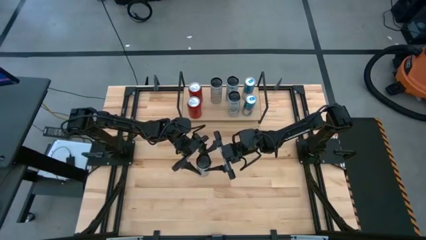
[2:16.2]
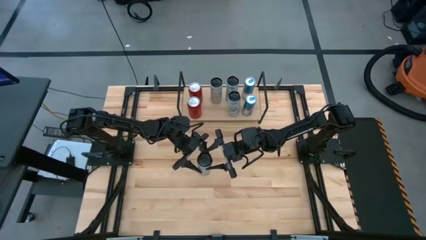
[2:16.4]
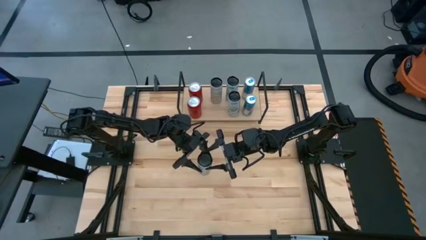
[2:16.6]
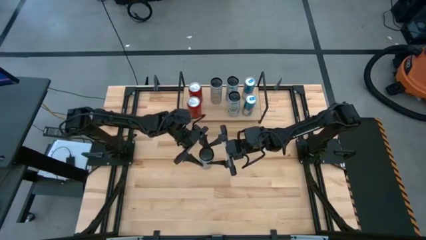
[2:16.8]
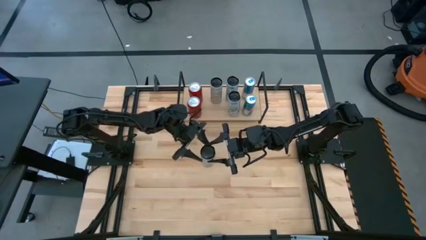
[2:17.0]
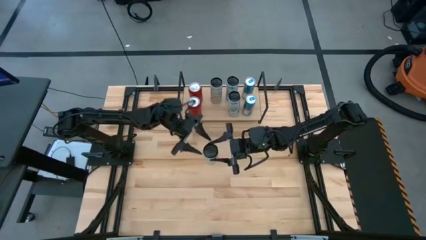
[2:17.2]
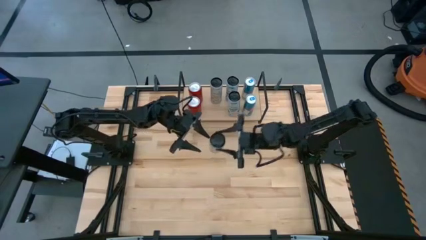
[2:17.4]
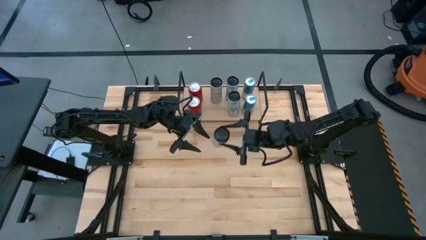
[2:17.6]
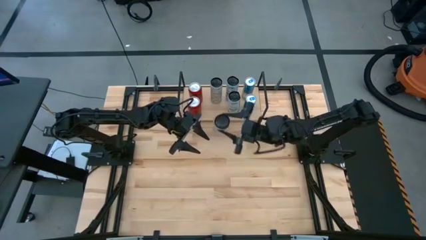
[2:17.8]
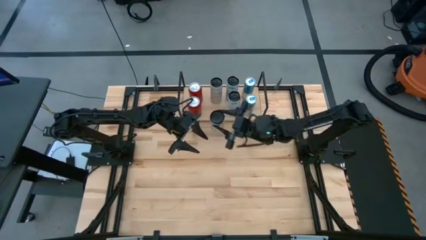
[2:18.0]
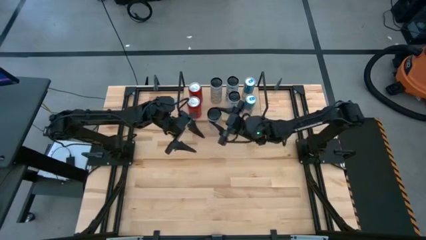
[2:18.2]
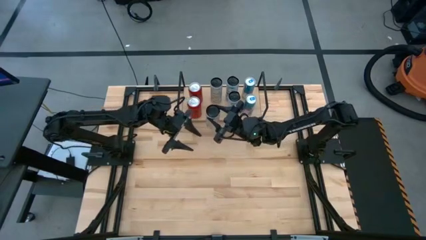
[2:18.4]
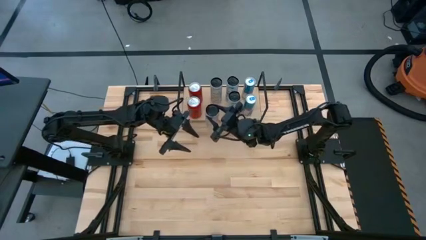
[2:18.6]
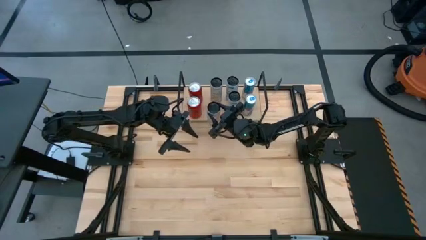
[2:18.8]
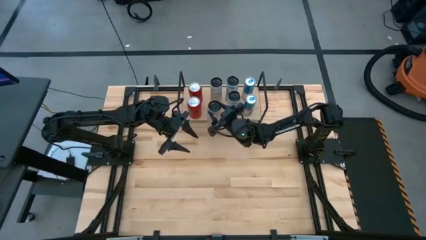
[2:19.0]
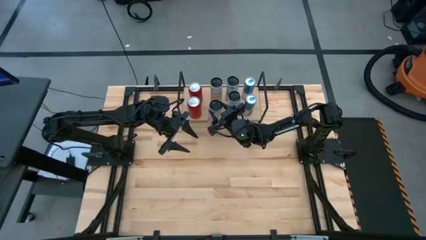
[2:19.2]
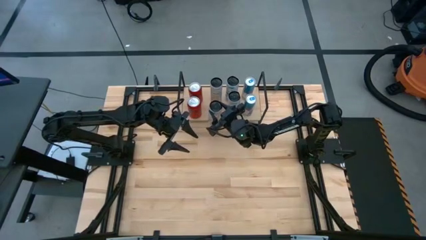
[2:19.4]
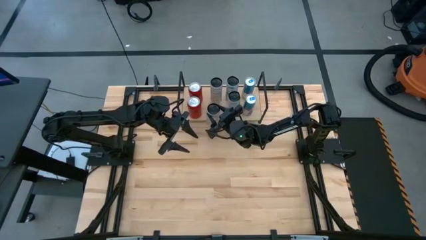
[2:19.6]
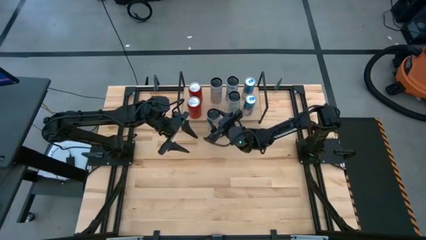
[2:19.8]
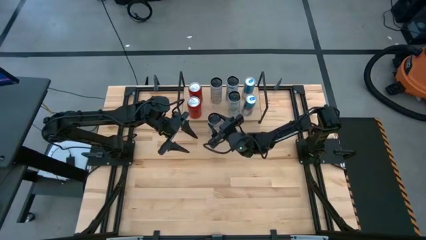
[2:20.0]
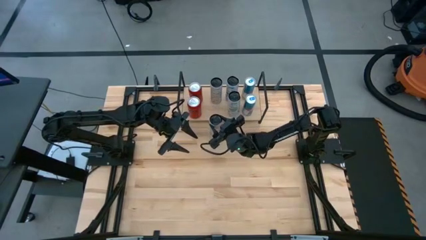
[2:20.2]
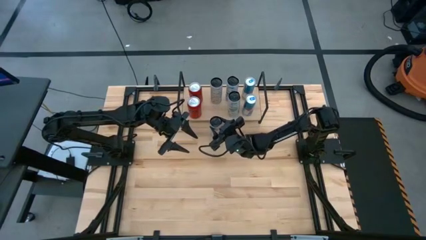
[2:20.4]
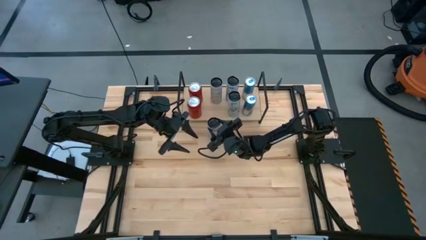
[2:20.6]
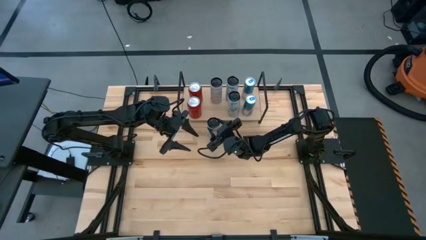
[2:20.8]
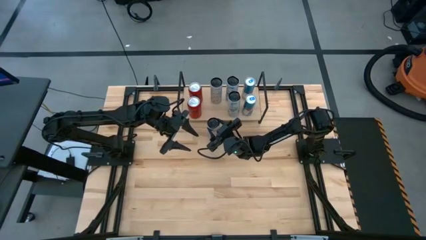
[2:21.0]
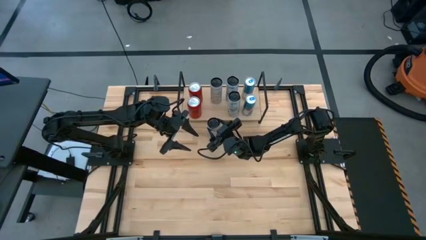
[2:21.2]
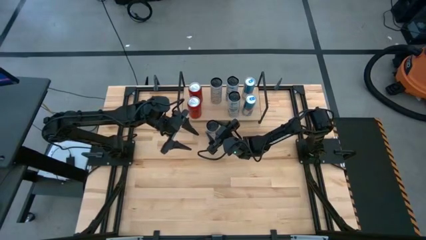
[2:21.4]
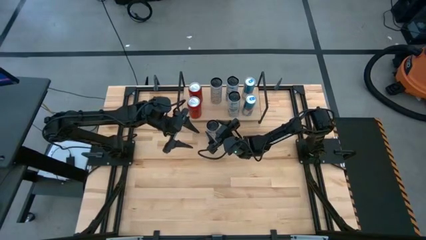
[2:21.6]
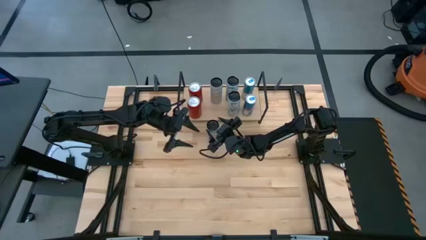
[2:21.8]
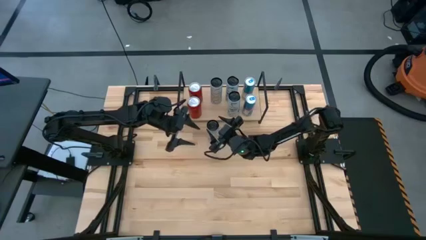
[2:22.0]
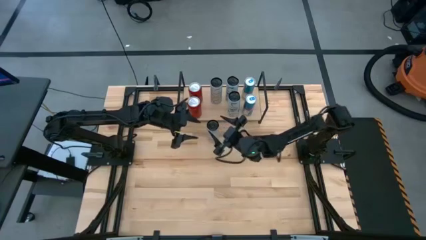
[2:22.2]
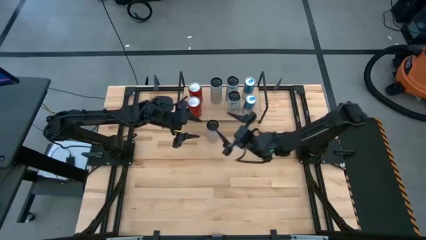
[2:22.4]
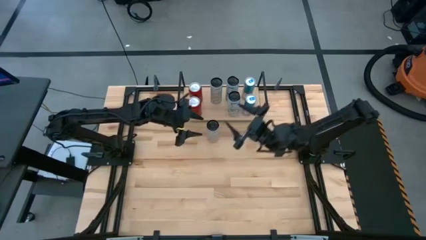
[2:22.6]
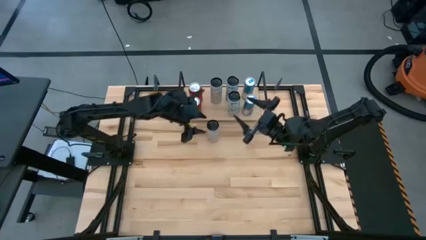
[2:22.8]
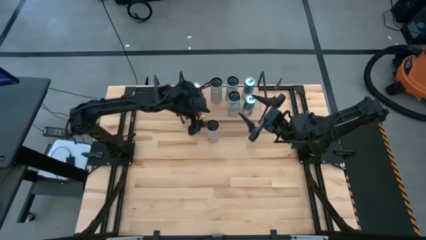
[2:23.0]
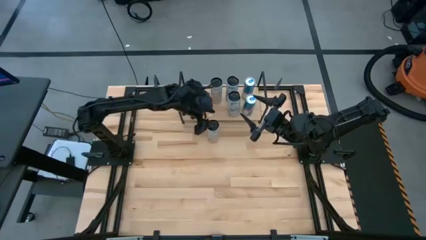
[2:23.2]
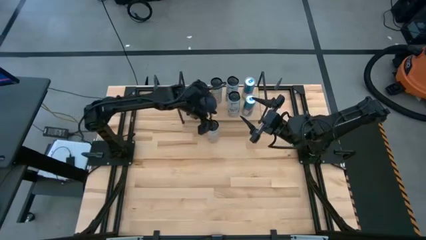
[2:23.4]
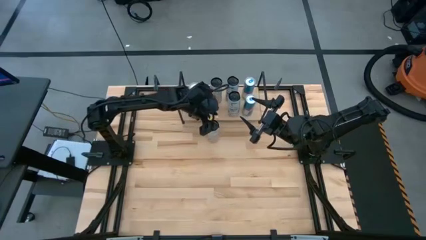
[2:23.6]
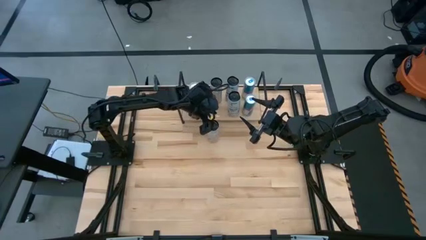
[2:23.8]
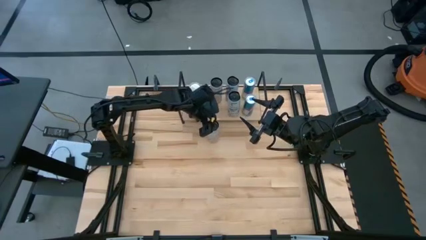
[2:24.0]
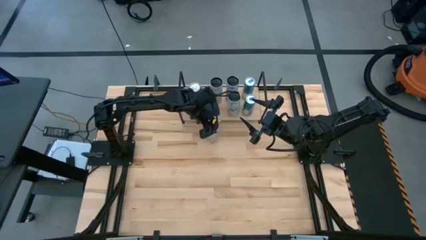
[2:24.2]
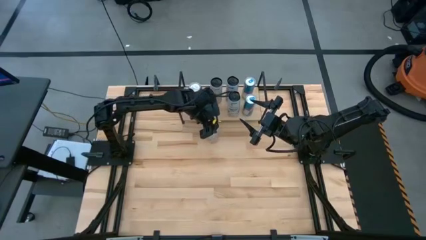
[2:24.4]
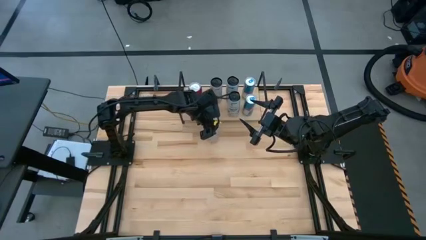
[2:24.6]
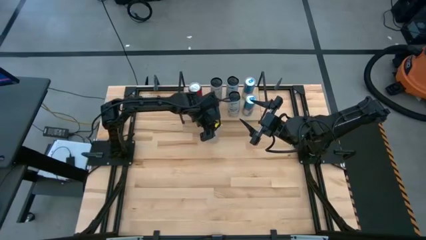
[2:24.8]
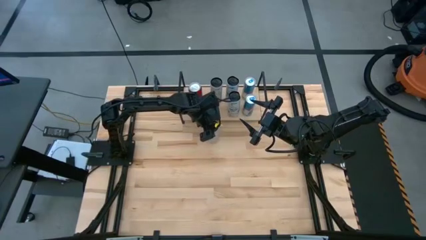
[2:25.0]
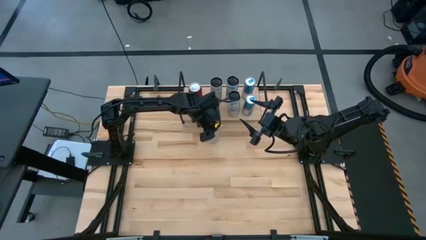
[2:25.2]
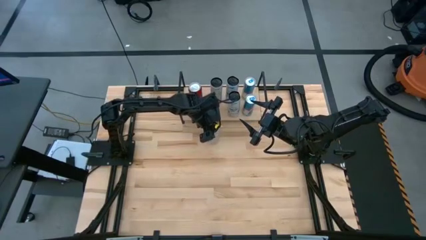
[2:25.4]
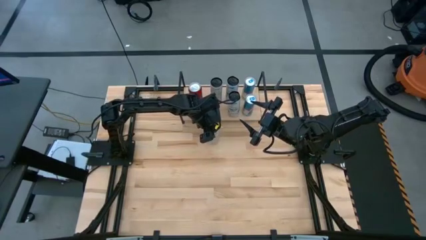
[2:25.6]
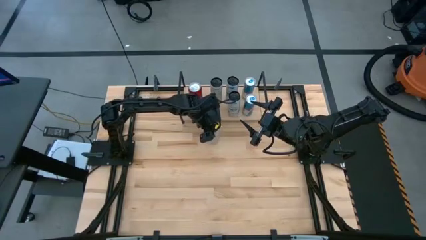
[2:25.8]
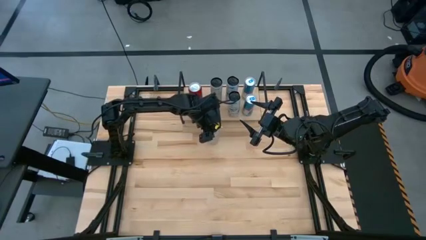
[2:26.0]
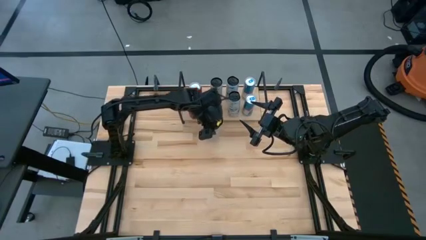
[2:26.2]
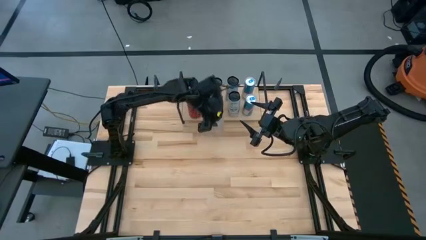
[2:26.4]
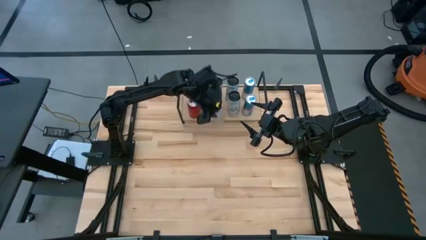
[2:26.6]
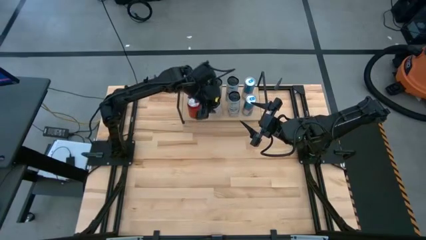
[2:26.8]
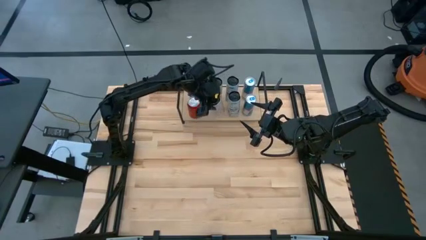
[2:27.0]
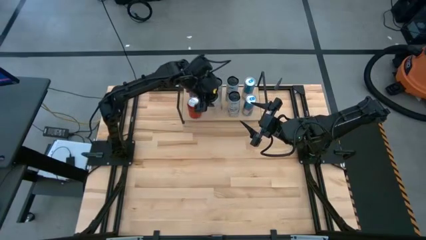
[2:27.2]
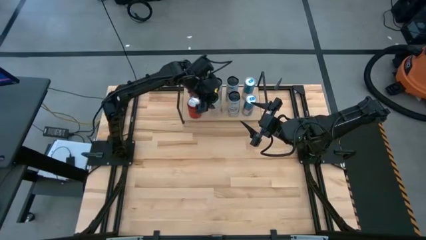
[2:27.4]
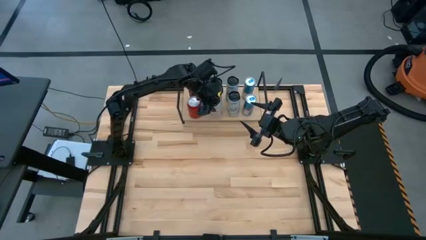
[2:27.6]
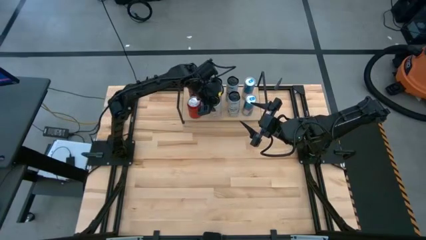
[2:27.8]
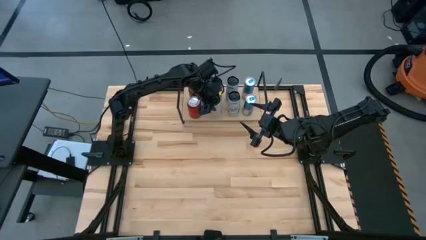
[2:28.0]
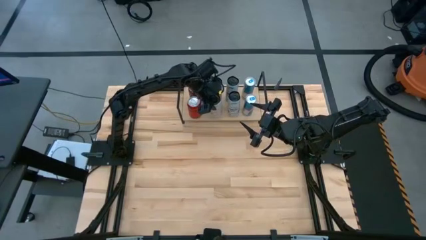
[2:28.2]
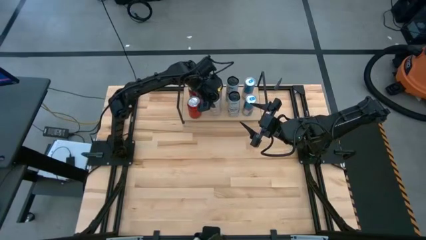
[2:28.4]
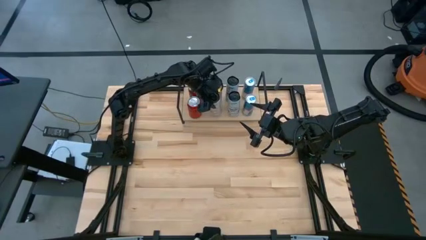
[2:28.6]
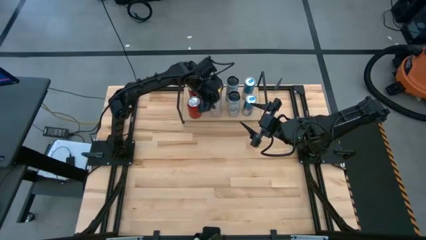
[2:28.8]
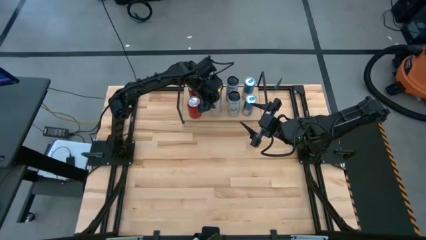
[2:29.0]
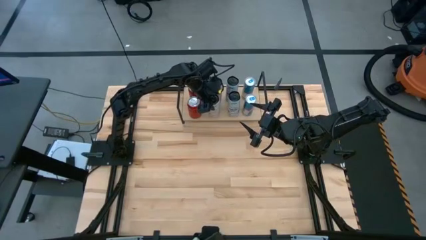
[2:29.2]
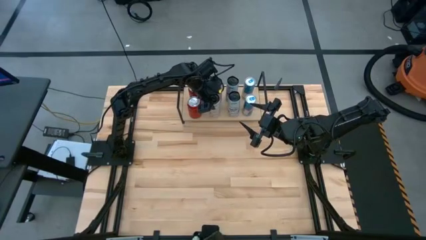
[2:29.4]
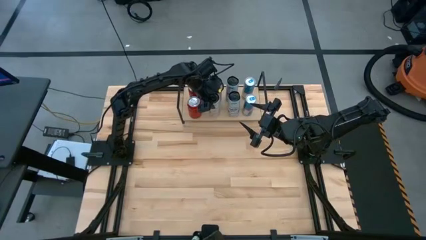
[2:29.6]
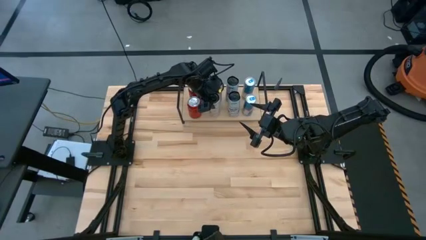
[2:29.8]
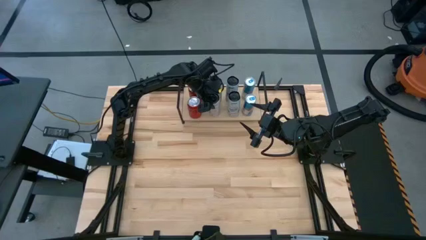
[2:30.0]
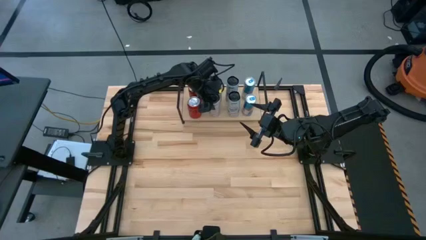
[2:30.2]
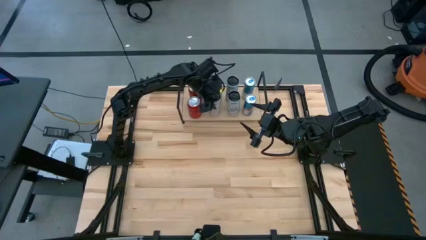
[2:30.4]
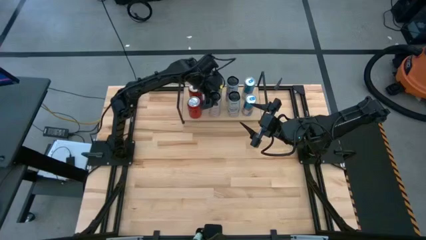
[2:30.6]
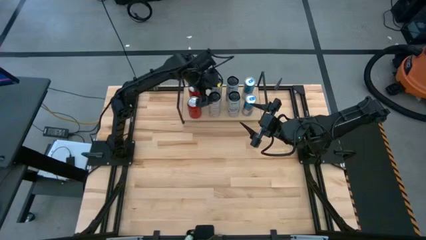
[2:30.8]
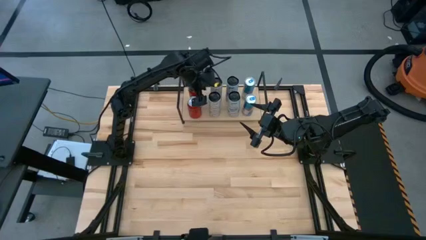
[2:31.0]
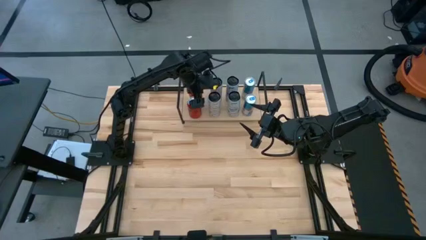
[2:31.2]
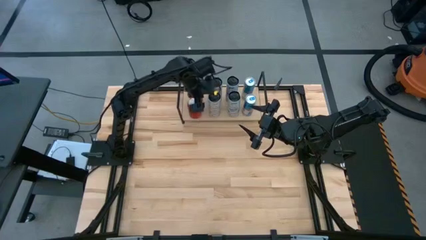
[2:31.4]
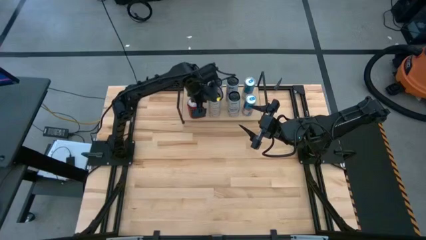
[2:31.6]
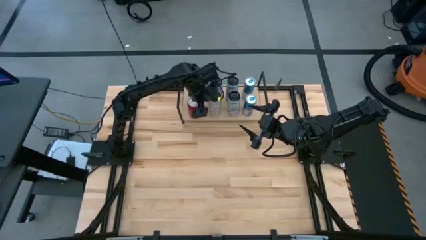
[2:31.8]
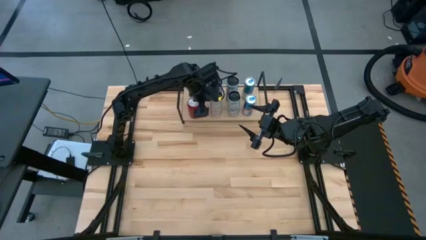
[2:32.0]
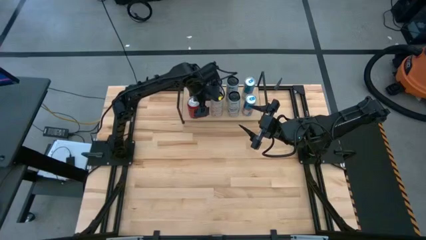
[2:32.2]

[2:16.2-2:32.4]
Task: Place canned beverage on shelf
Put the black soda can on the shelf aligned with the other red soda can

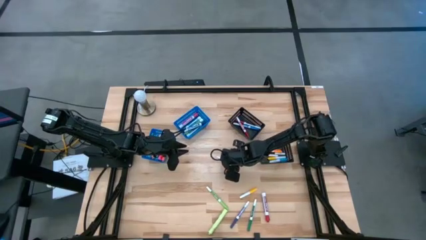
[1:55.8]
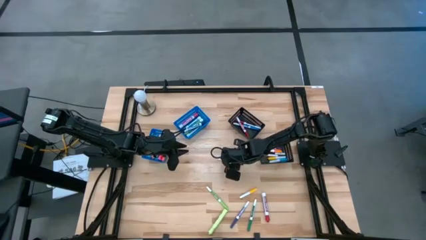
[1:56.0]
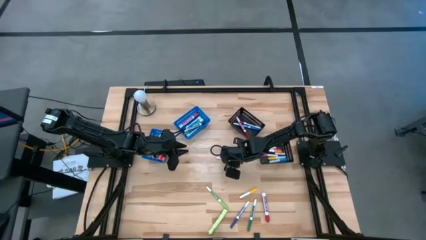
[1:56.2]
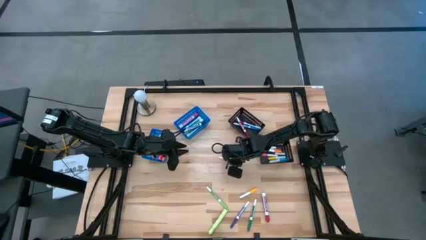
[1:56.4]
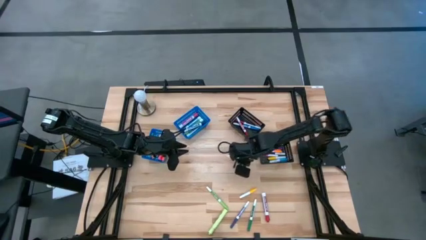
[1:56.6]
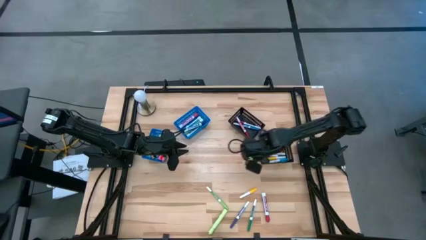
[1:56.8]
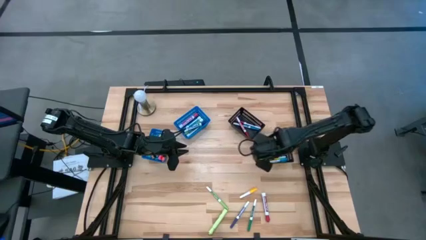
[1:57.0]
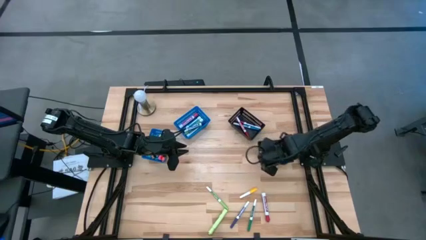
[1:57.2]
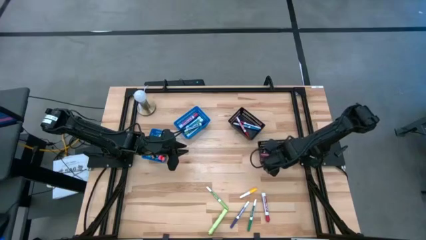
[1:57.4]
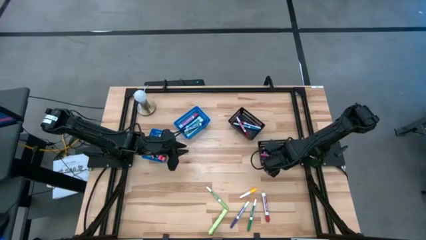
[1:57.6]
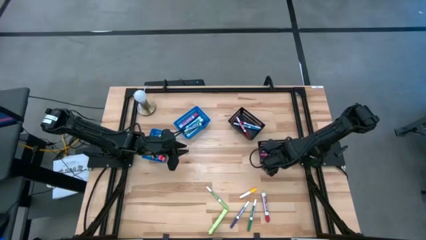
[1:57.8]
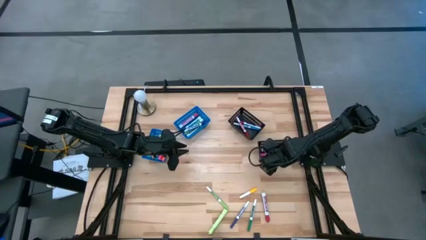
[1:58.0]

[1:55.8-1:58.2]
Task: Pick & Place Markers
Put the orange highlighter pen into the left blue bin
